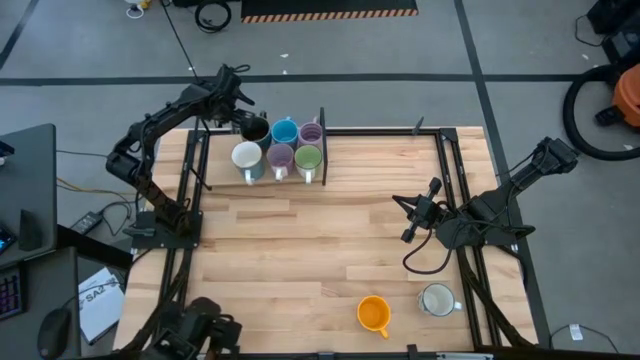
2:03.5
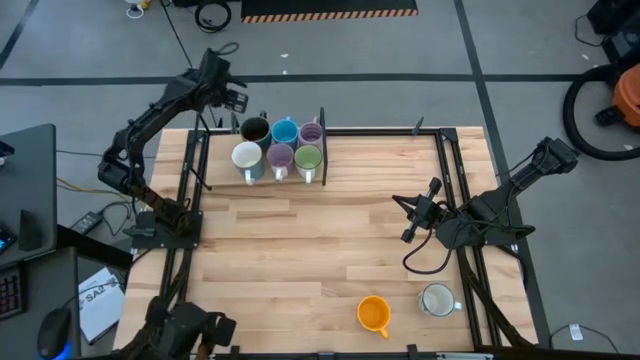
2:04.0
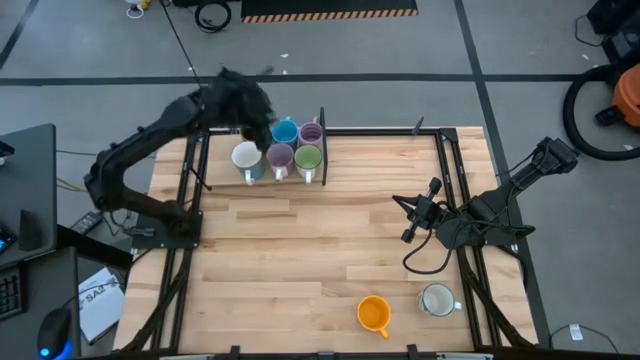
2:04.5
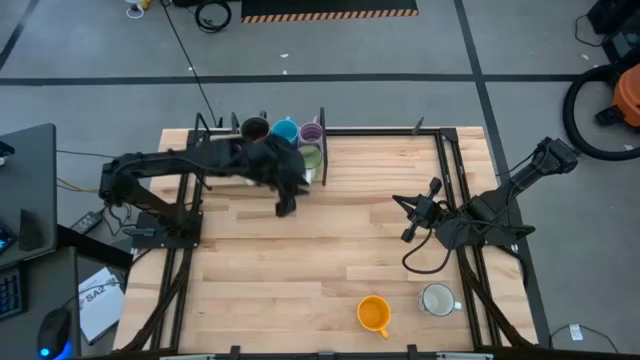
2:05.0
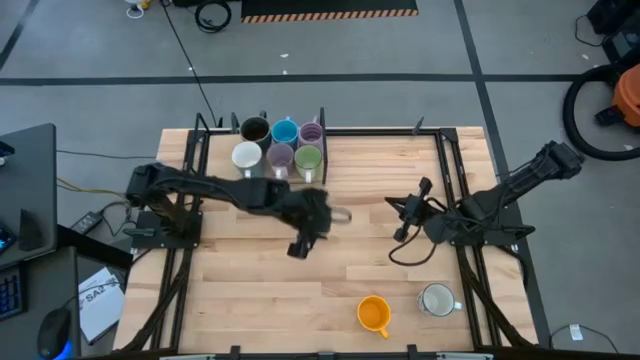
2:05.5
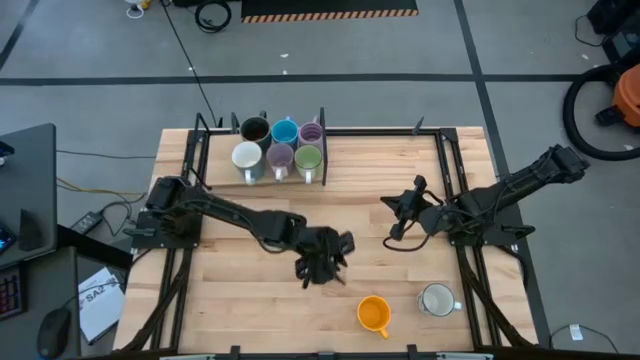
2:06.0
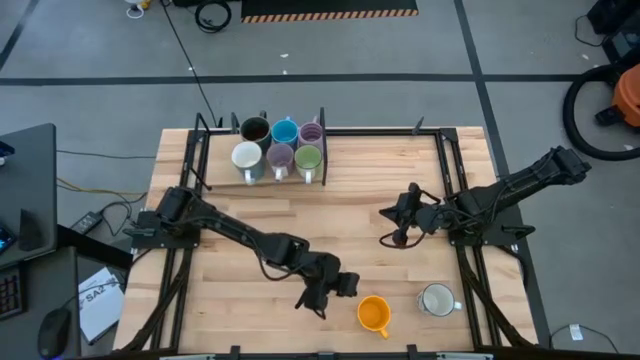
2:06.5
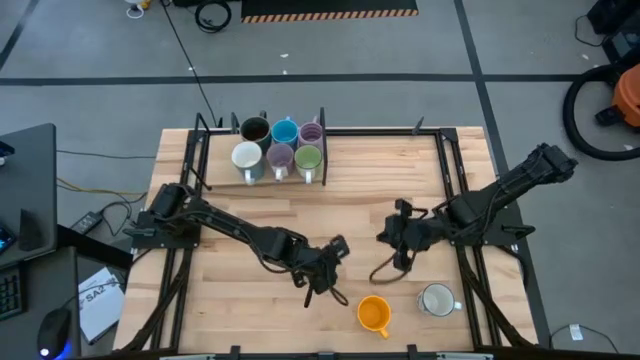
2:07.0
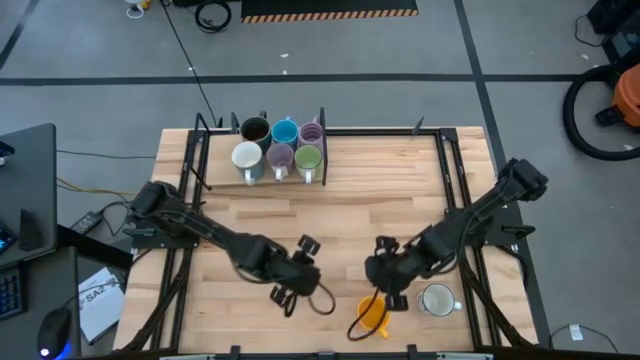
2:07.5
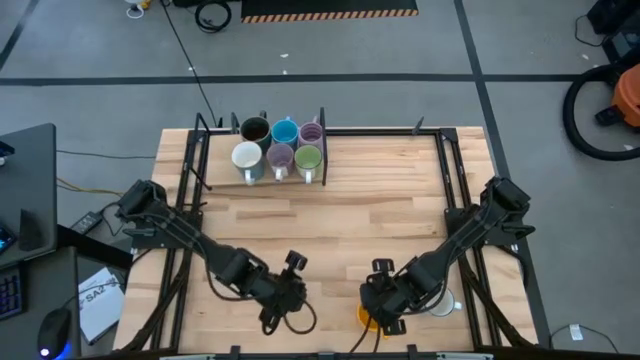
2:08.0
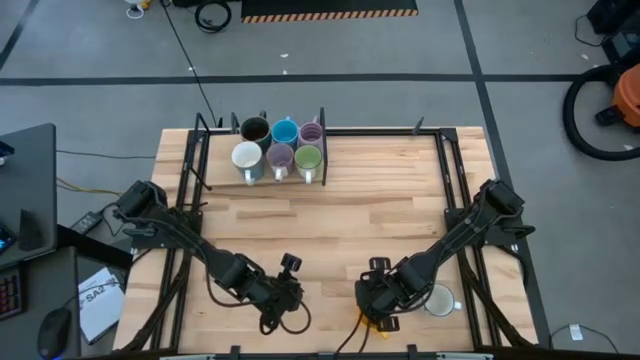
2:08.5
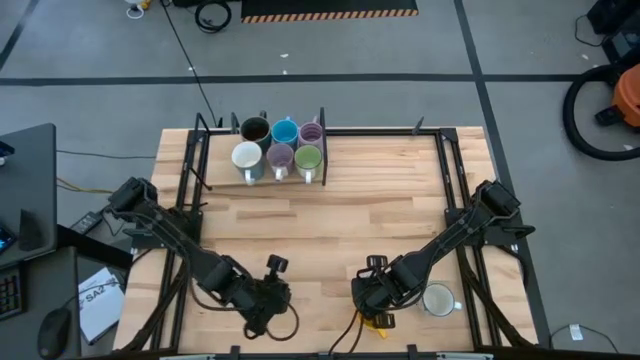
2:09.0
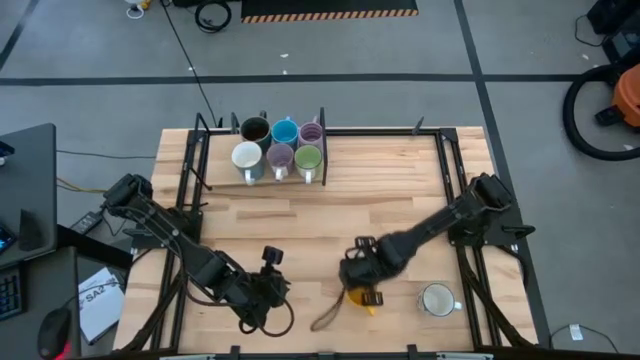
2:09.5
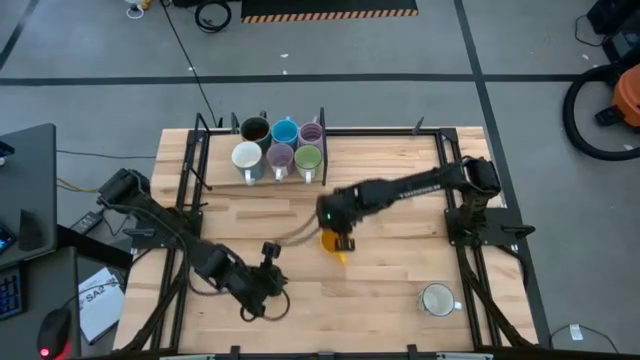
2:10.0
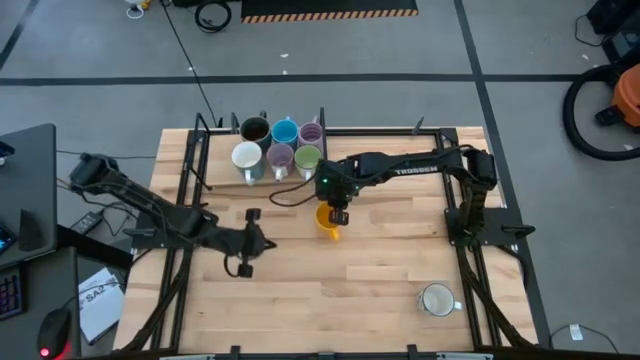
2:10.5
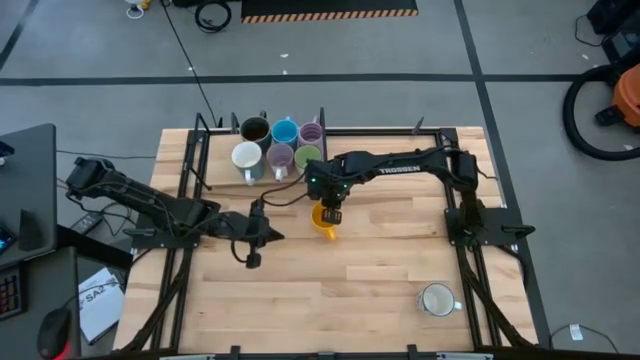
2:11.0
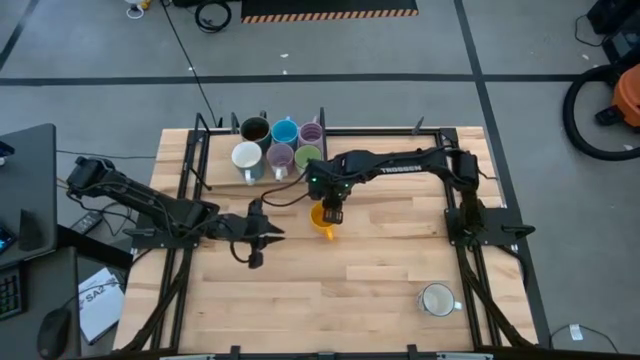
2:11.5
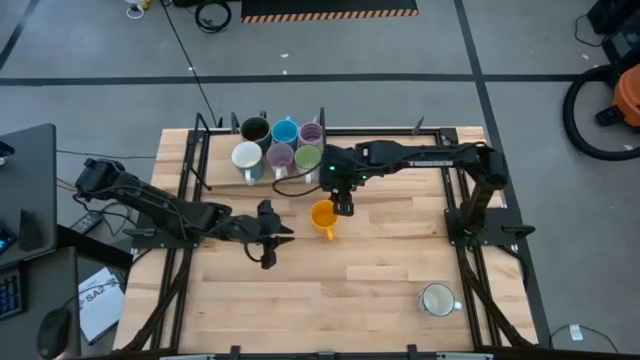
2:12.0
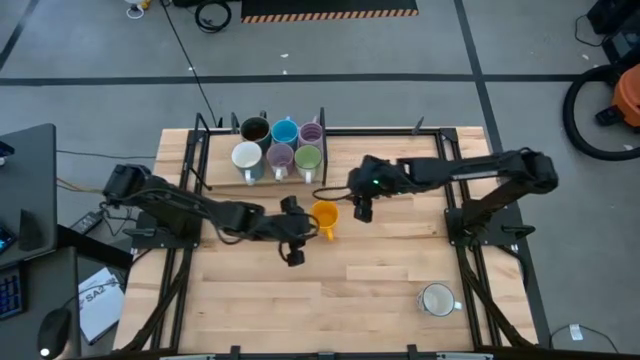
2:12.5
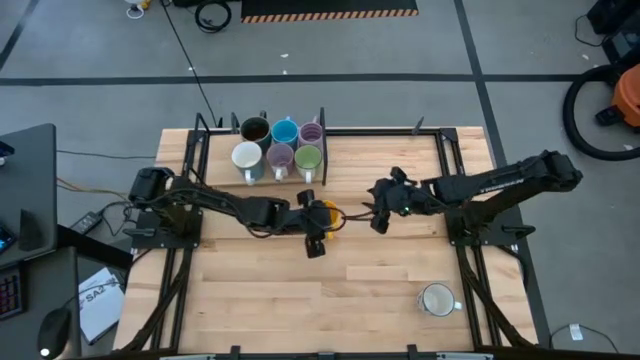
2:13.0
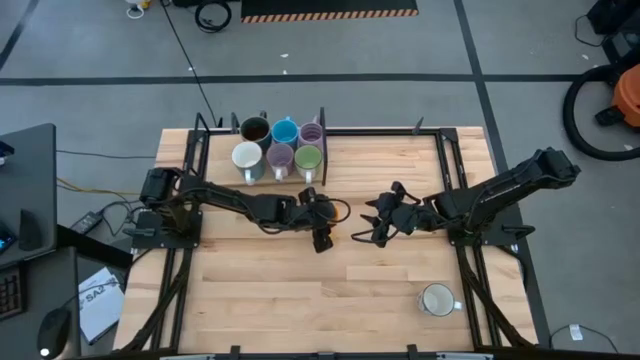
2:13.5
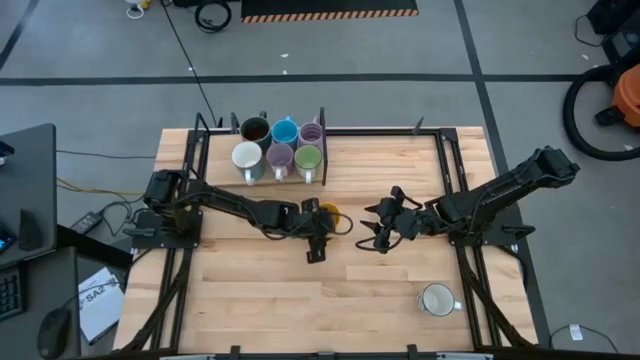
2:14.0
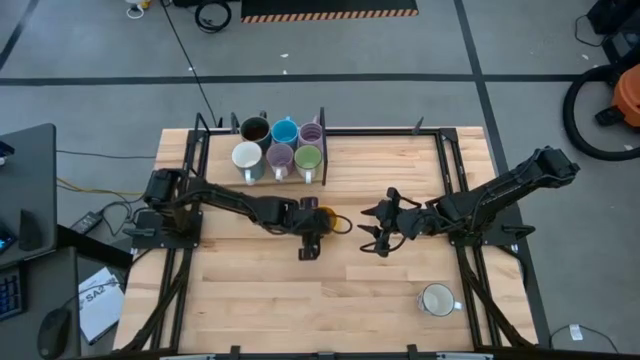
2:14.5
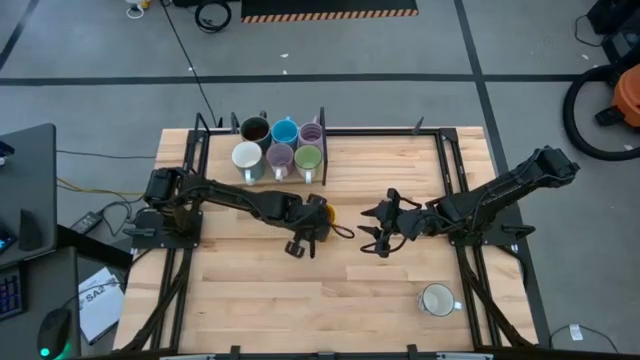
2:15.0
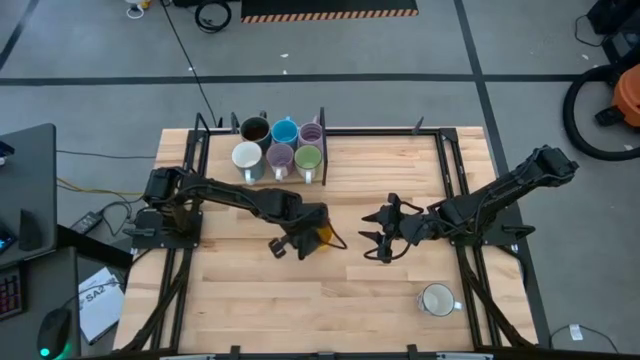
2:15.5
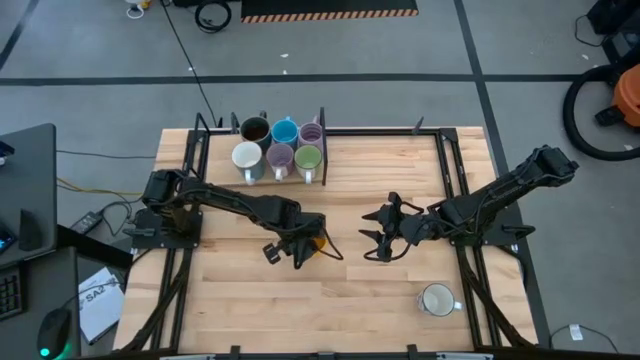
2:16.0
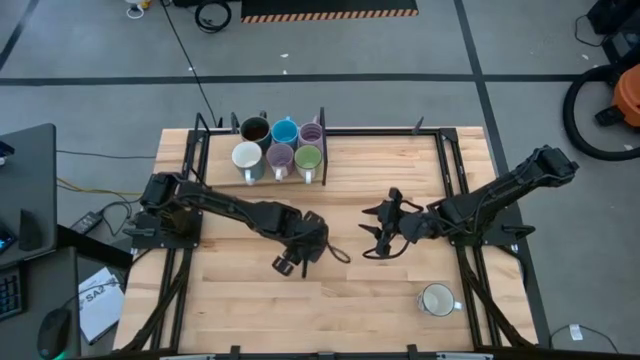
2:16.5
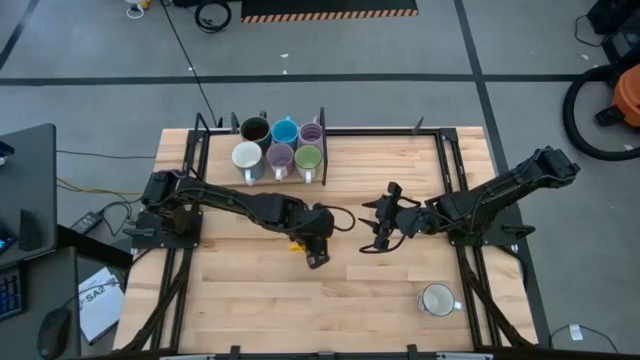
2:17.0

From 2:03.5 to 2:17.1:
Task: Place coffee mugs
Put the yellow mug on the shelf

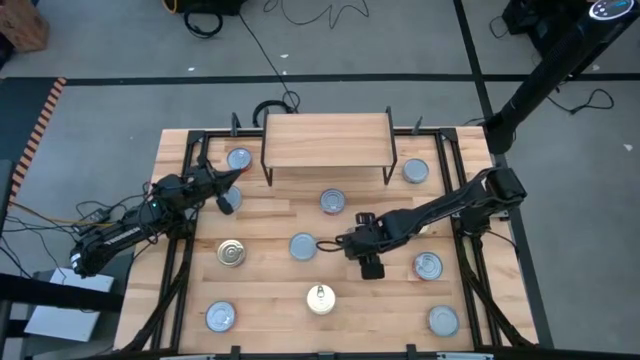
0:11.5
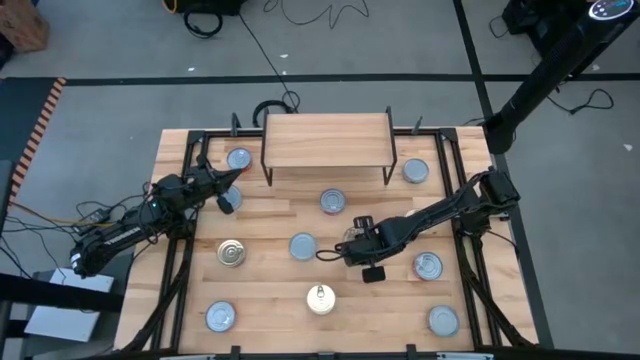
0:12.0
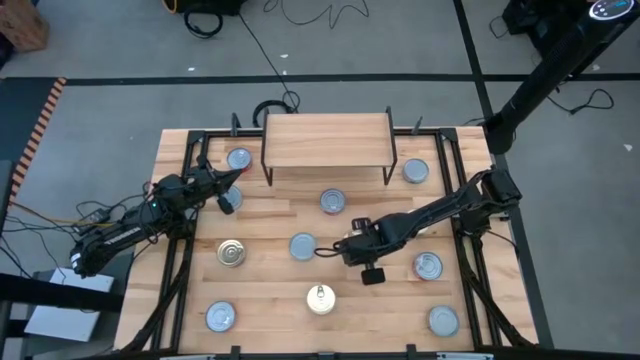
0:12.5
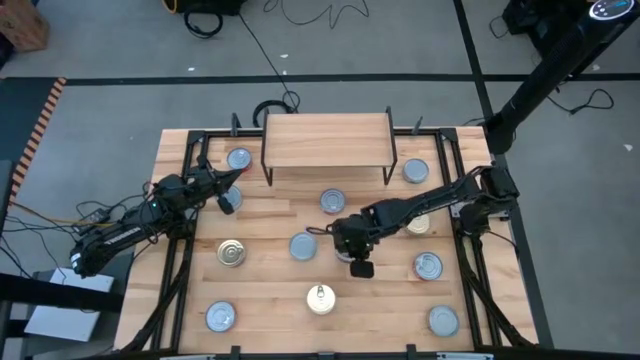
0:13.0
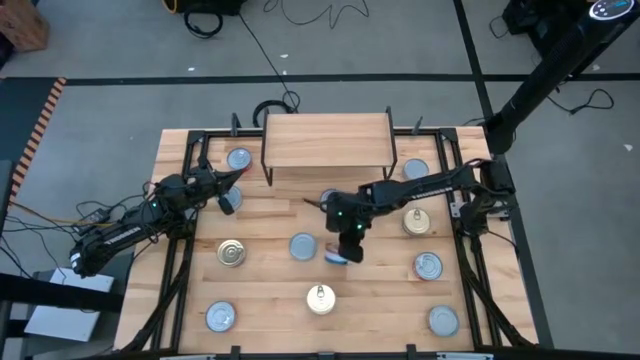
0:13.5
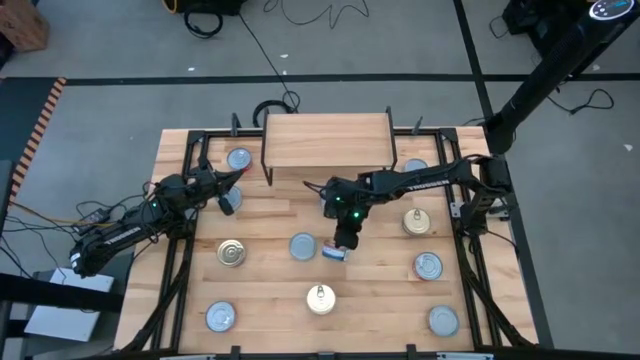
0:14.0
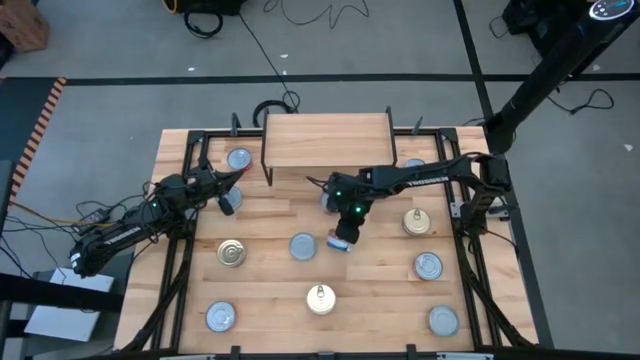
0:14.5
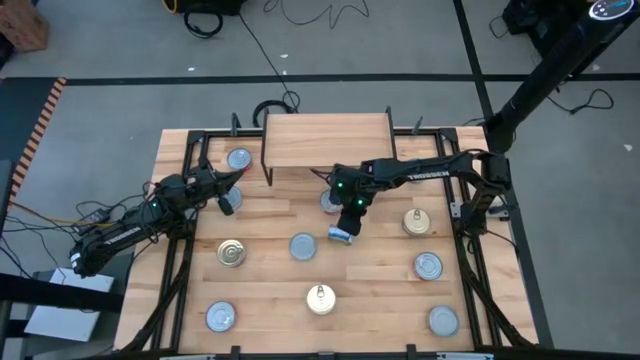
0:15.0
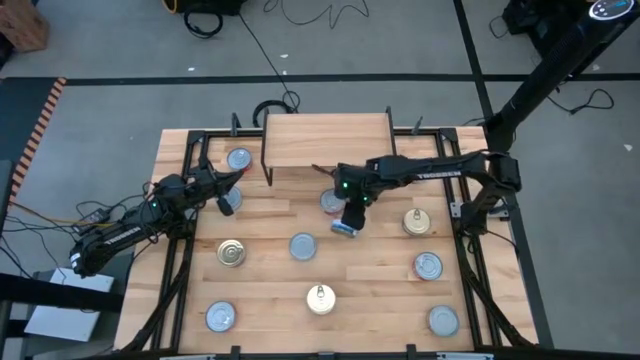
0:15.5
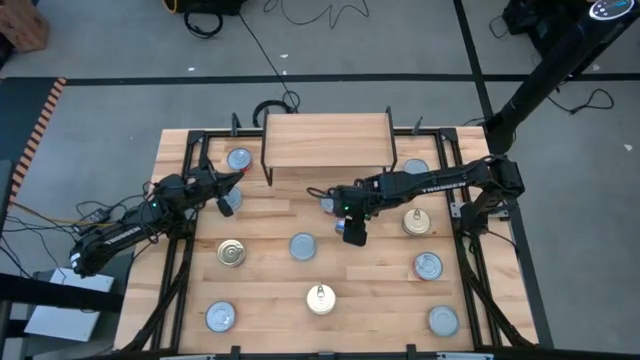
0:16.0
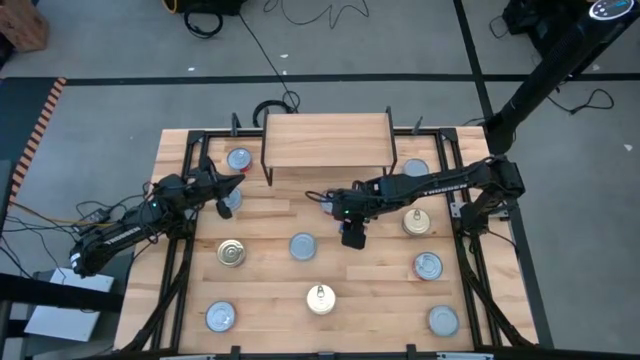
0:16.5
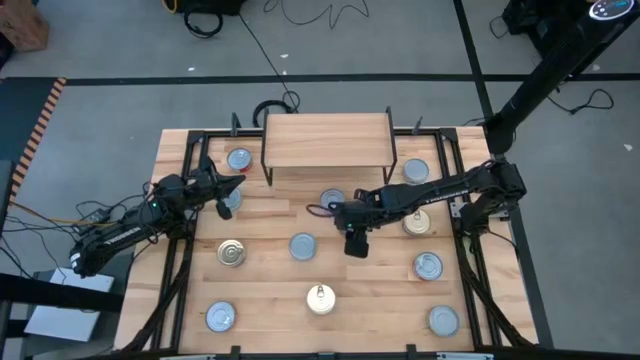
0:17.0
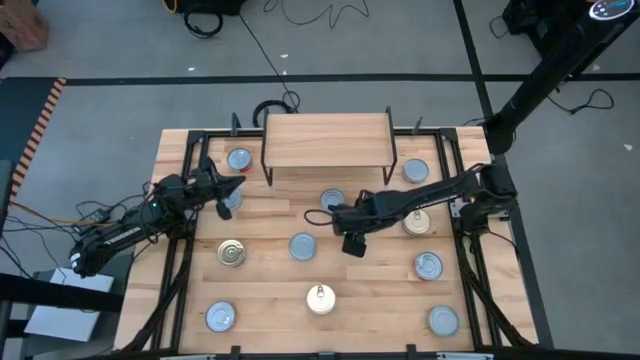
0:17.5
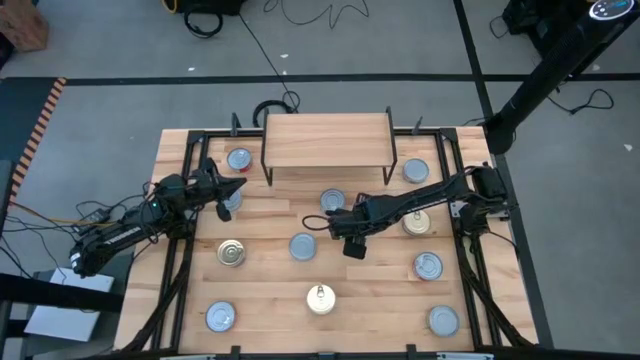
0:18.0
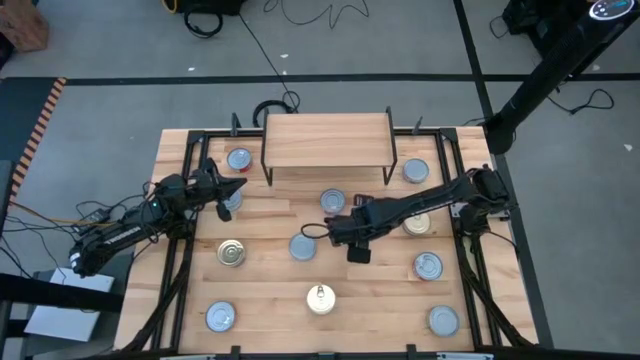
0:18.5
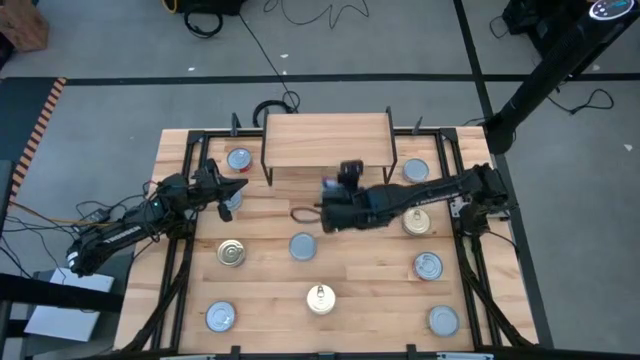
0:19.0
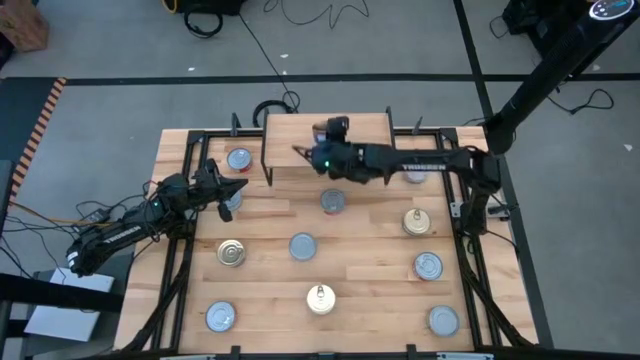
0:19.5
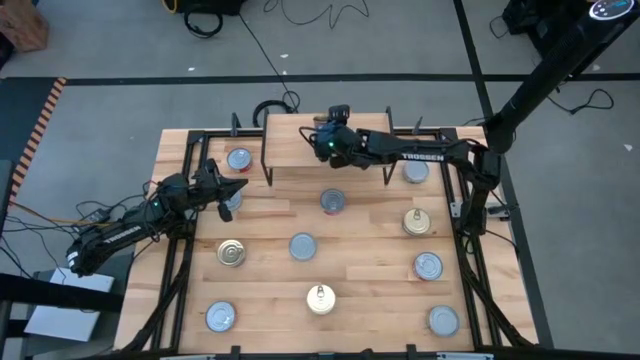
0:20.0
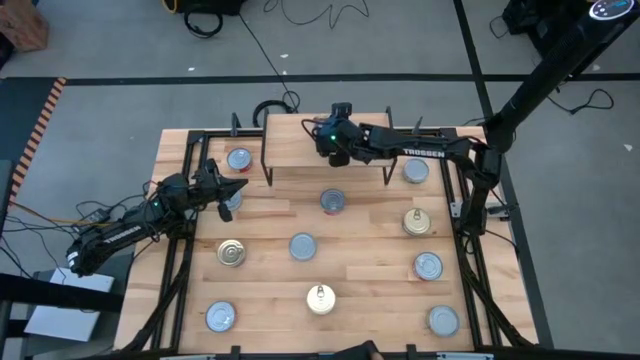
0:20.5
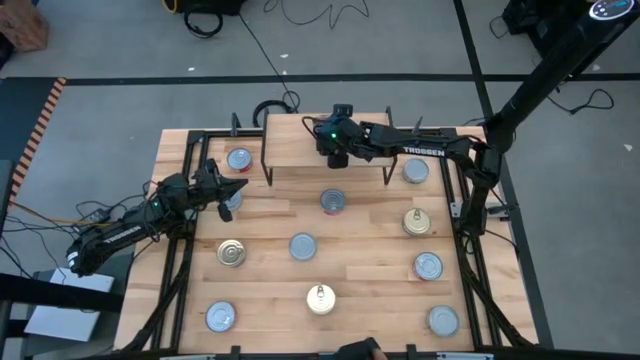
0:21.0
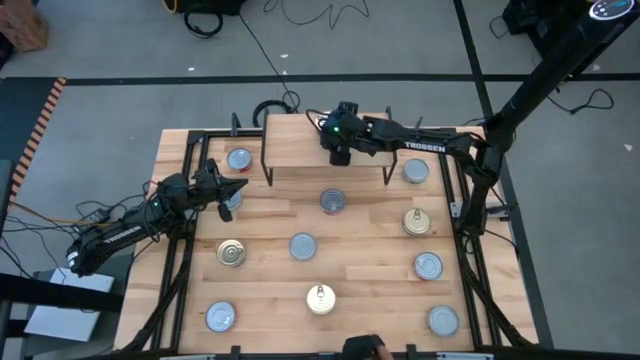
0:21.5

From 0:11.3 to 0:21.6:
Task: Stack canned seafood by type on shelf
Put the blue pink tuna can on the shelf
